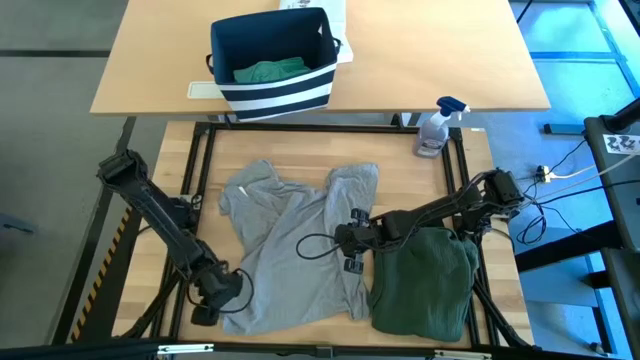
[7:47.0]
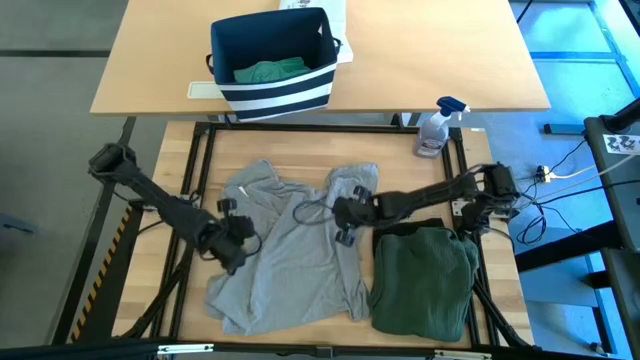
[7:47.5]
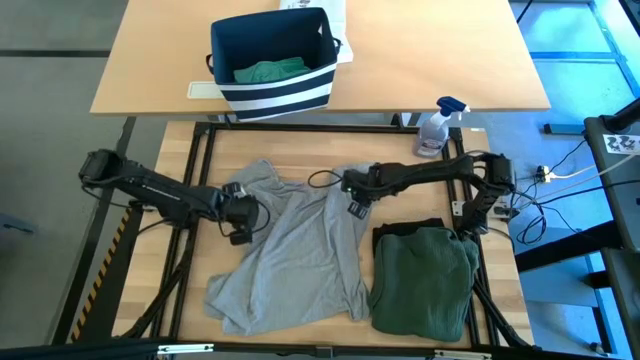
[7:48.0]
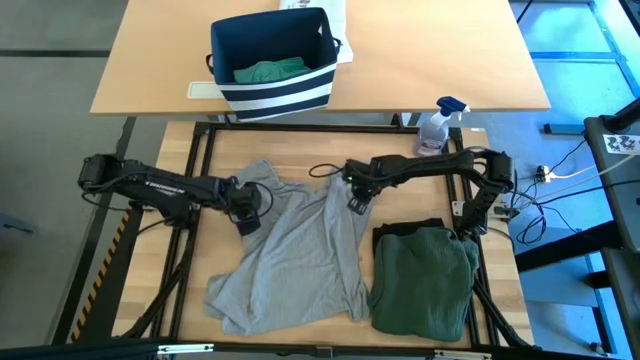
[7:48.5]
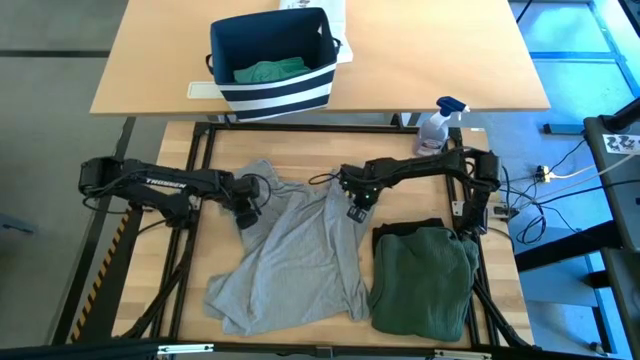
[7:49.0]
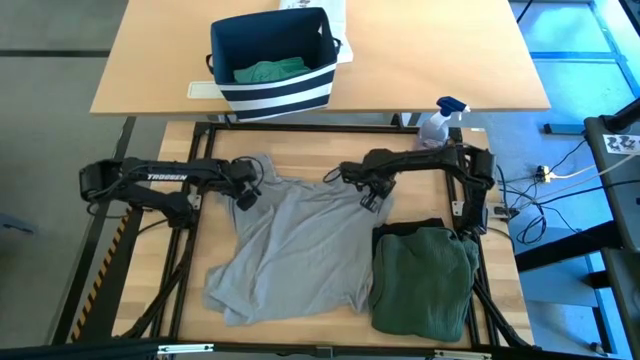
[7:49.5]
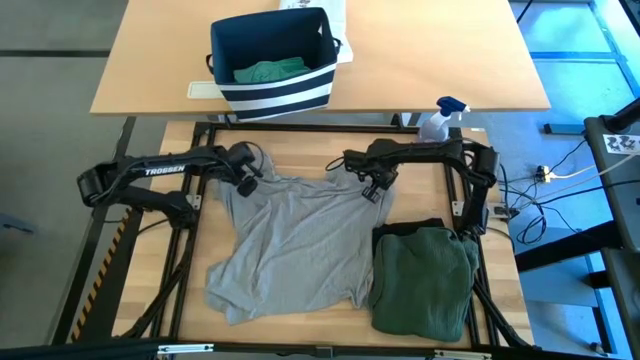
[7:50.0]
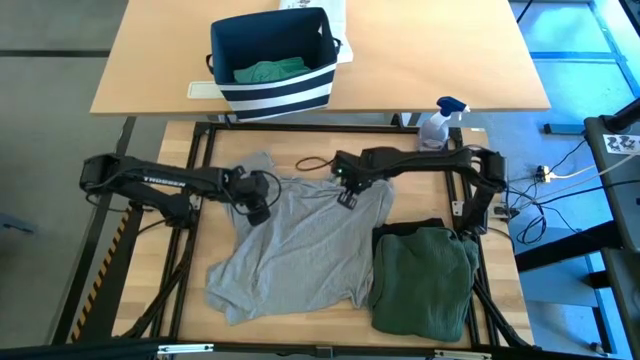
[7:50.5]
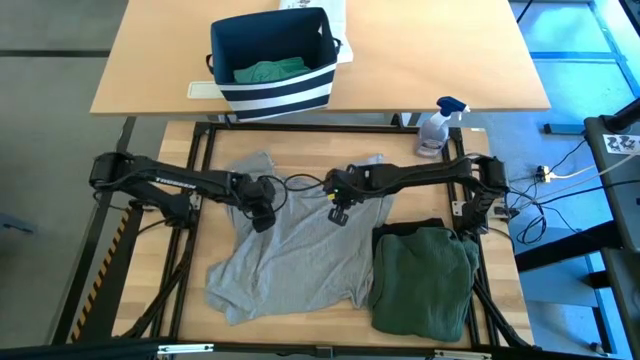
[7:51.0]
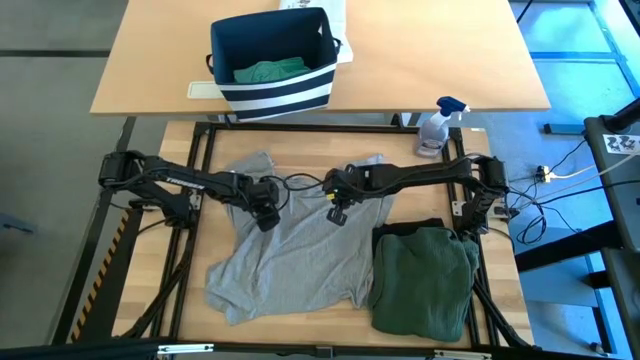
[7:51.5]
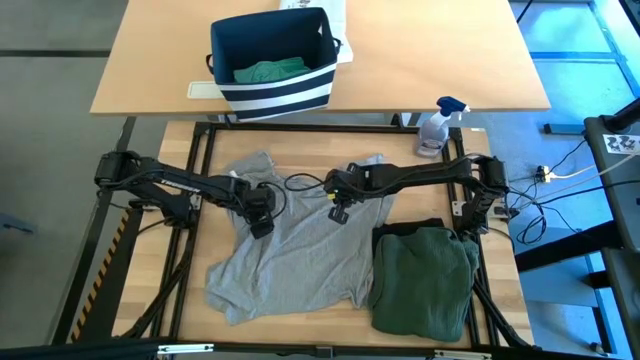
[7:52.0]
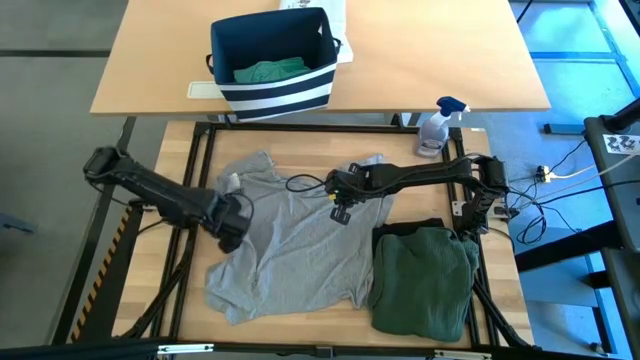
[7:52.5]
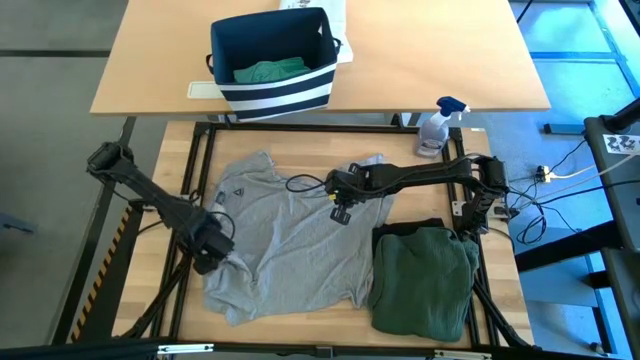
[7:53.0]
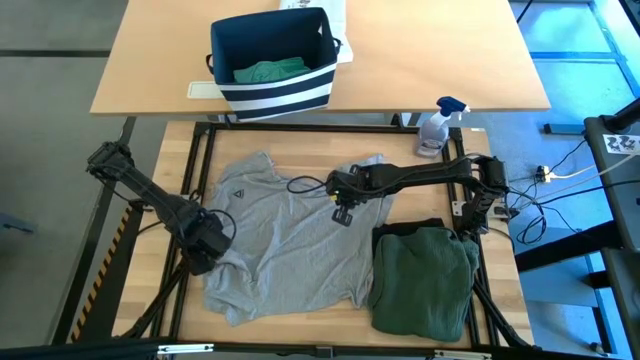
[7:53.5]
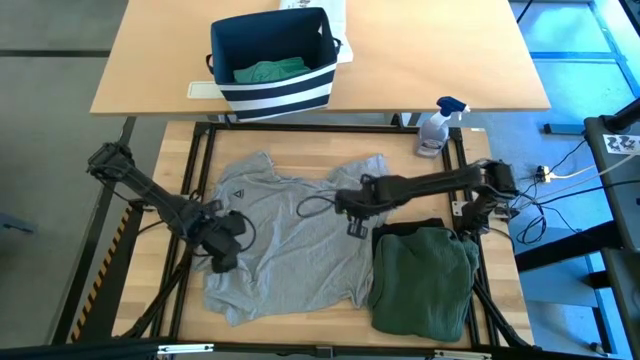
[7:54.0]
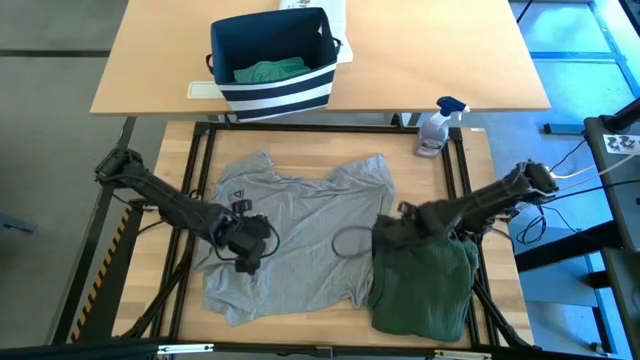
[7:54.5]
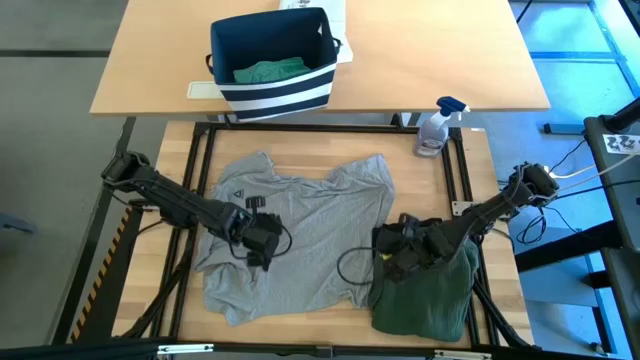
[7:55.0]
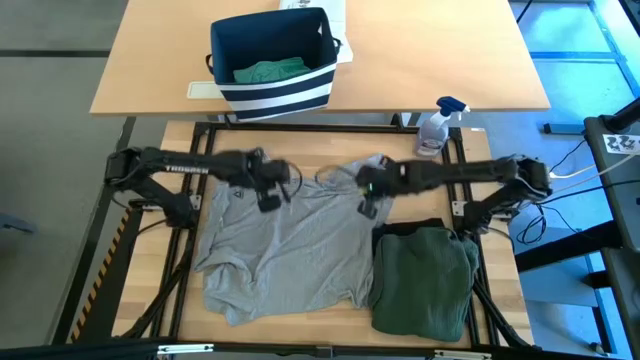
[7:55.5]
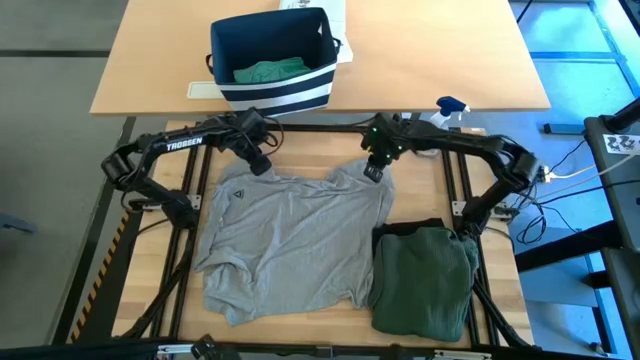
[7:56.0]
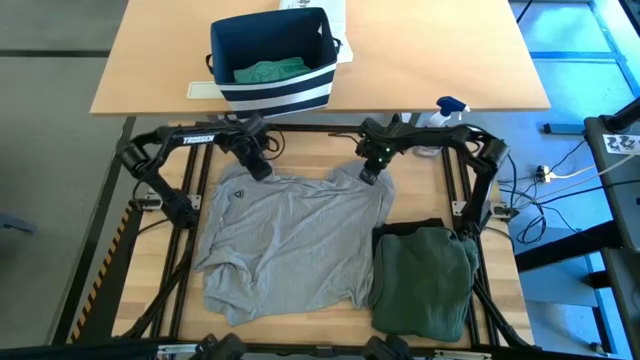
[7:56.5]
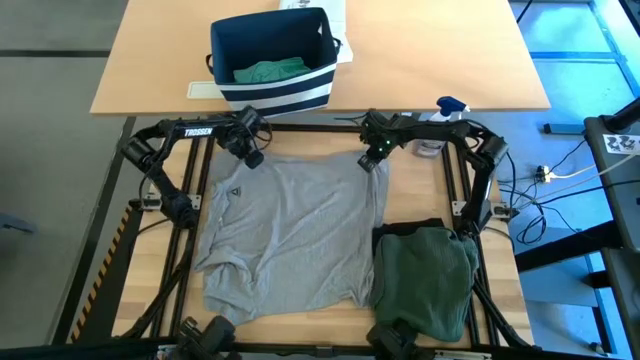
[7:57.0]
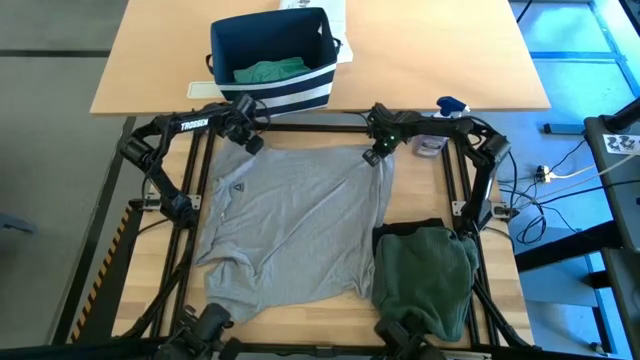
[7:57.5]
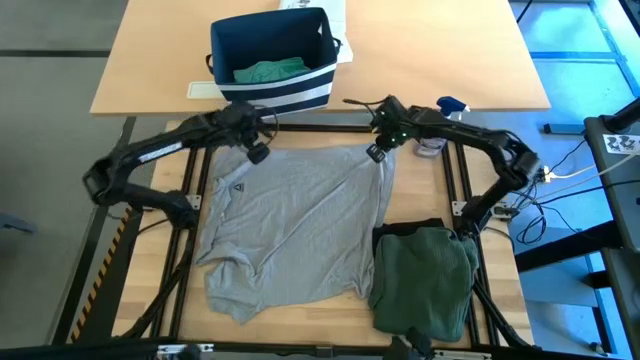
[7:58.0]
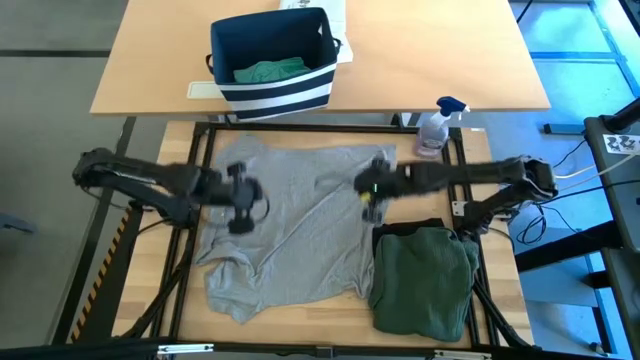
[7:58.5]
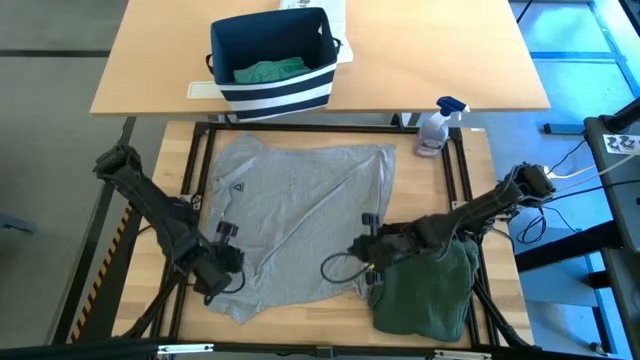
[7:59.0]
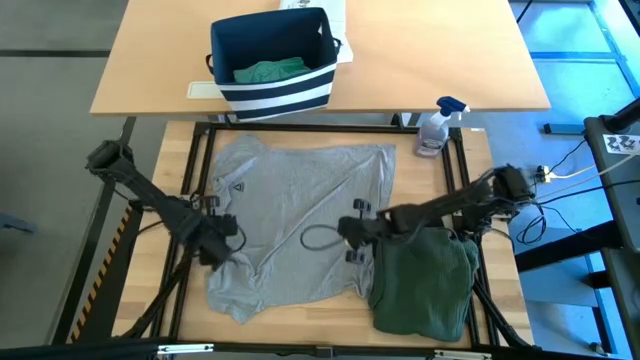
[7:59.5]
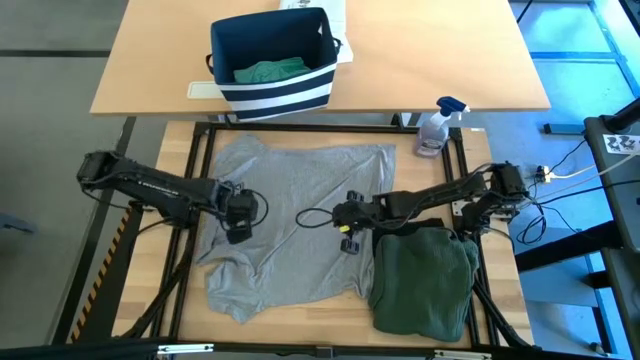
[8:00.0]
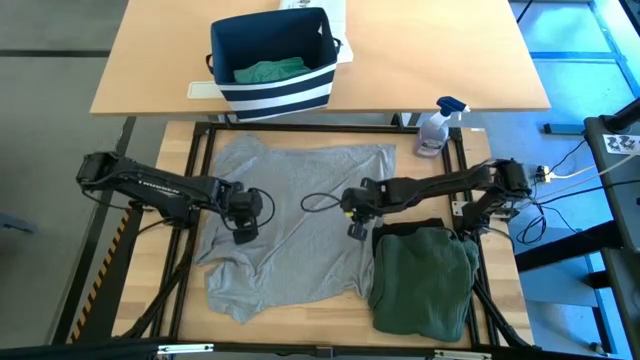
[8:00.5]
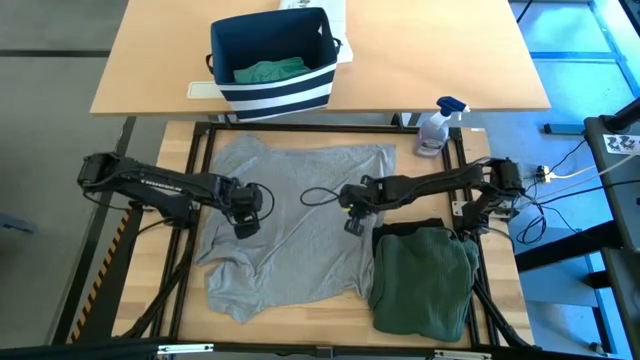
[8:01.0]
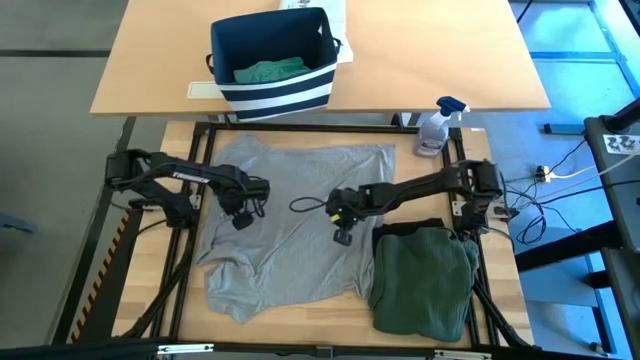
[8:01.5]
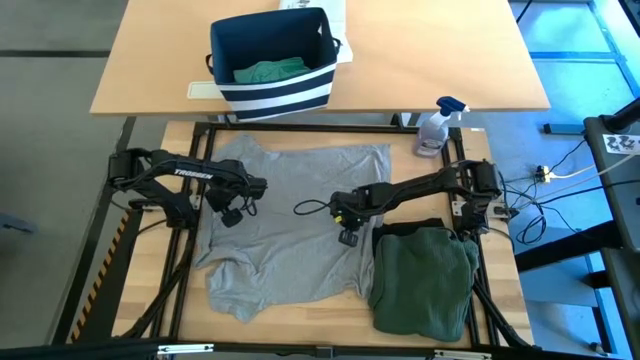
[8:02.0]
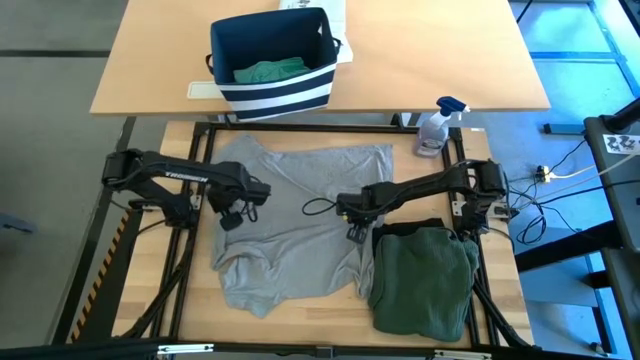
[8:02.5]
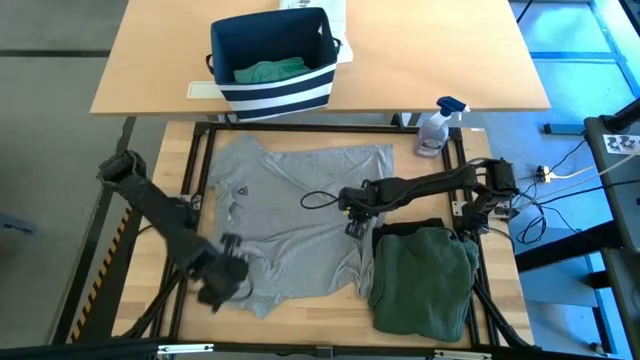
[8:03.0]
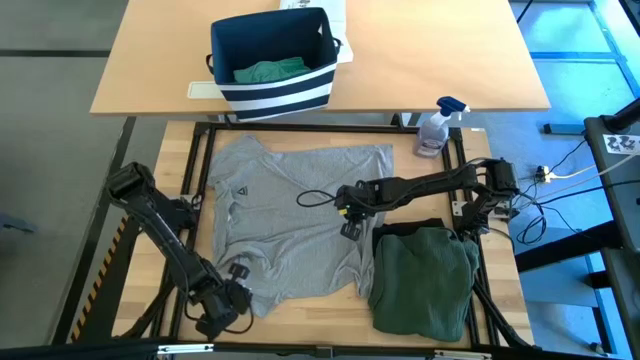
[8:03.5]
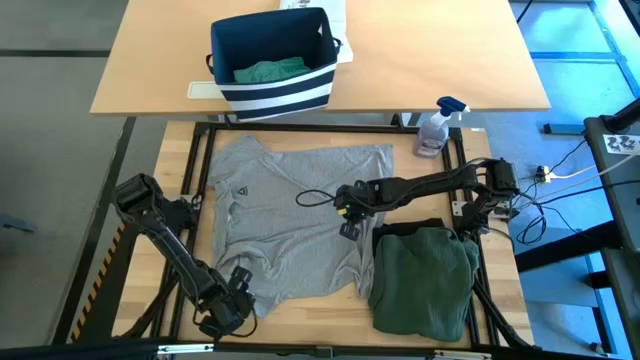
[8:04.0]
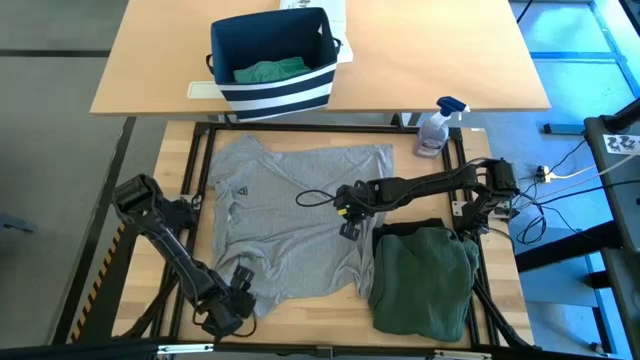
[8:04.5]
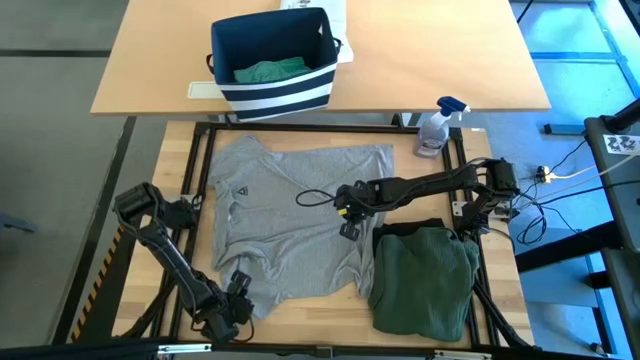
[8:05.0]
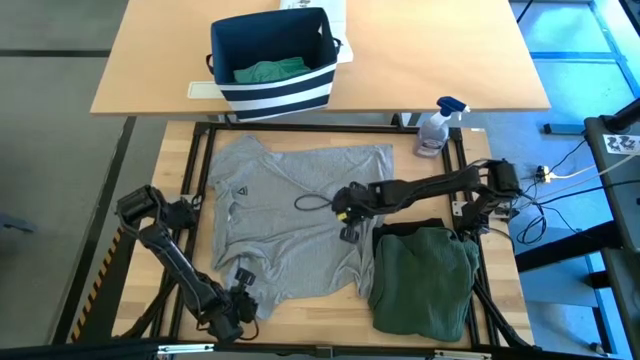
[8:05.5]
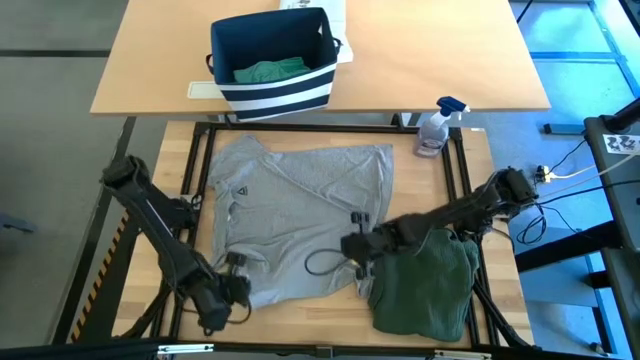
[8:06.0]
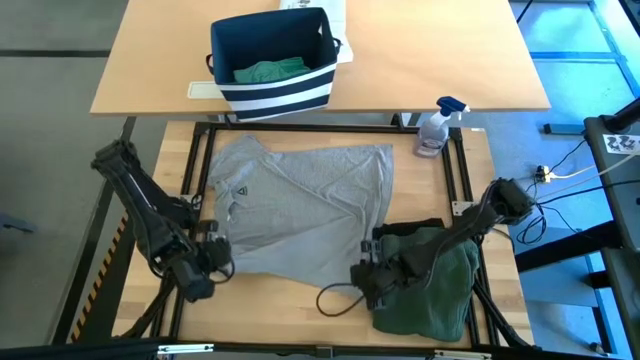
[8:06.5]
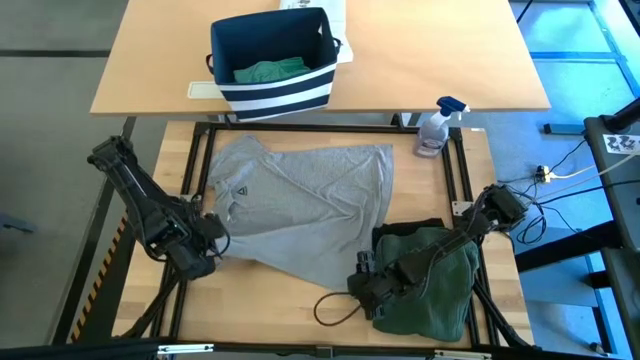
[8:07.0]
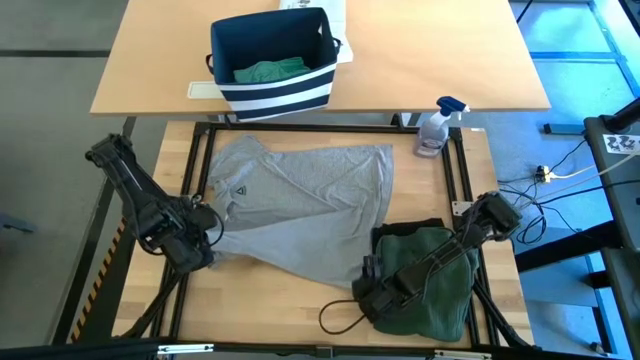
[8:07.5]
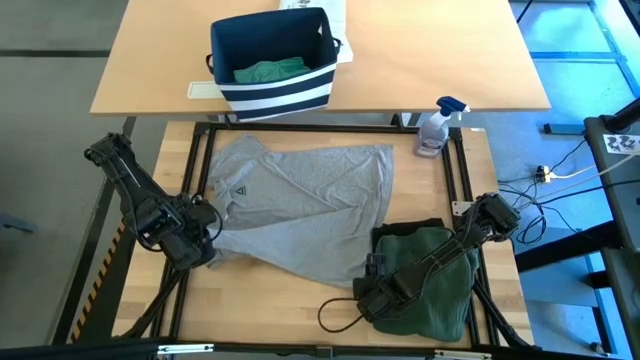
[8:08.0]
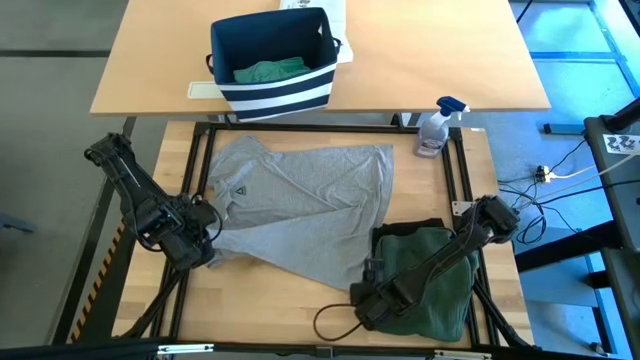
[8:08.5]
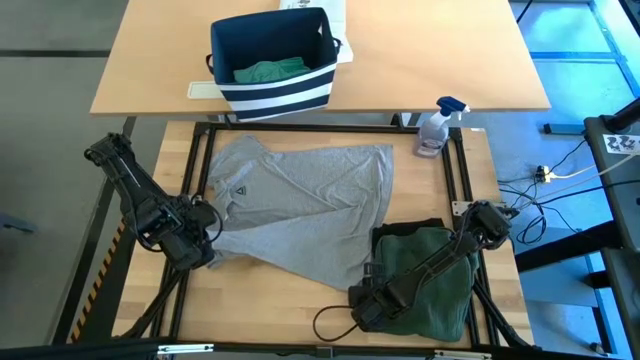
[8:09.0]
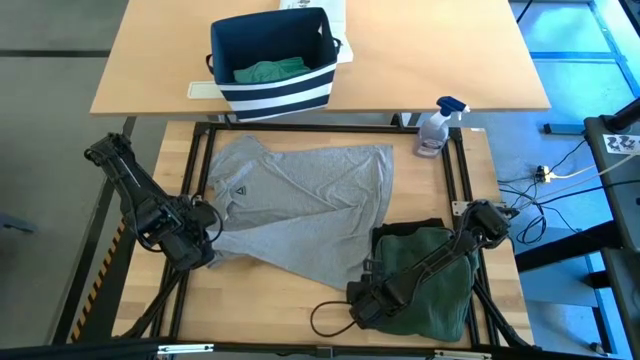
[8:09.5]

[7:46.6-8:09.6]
Task: Fold Laundry from Bin
Fold the gray shirt
